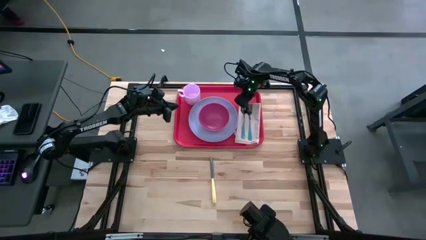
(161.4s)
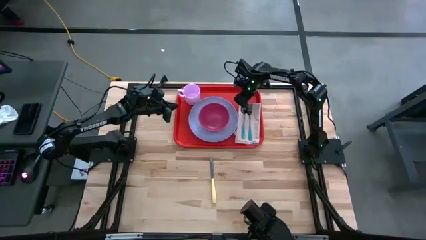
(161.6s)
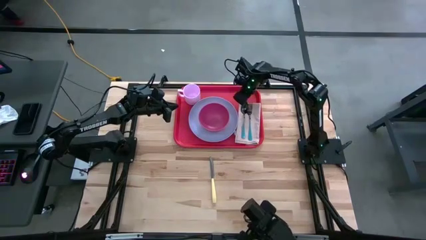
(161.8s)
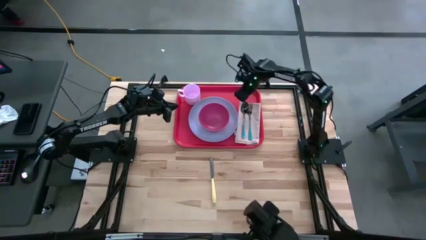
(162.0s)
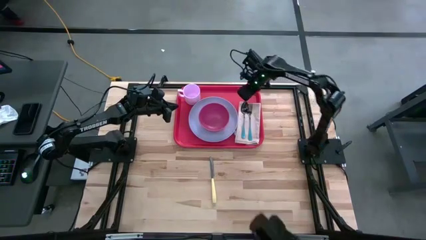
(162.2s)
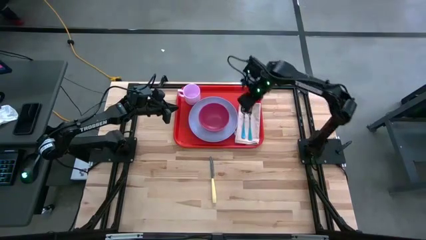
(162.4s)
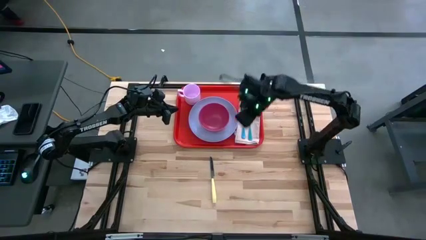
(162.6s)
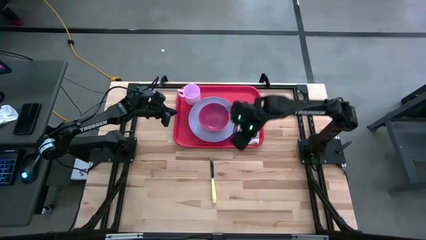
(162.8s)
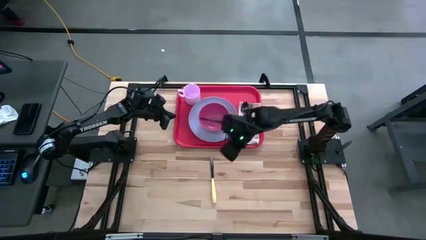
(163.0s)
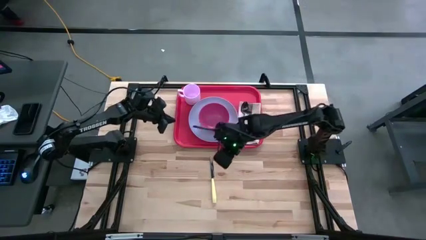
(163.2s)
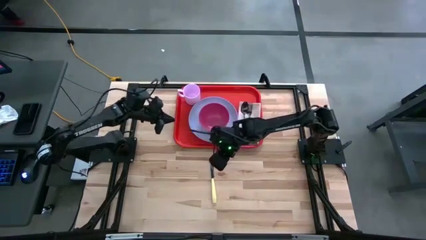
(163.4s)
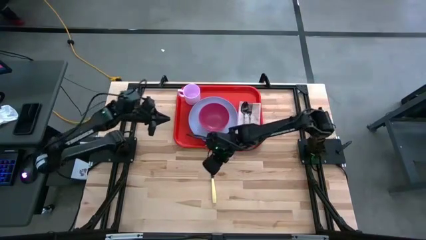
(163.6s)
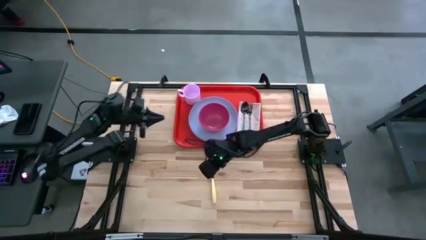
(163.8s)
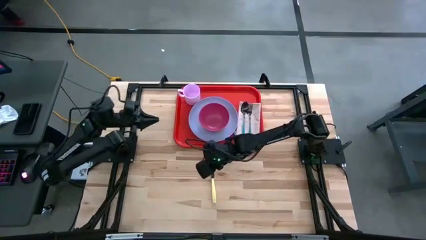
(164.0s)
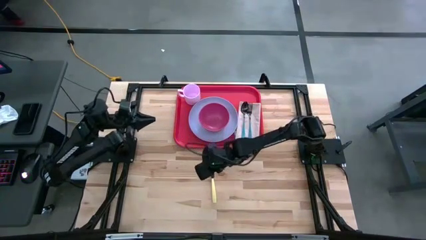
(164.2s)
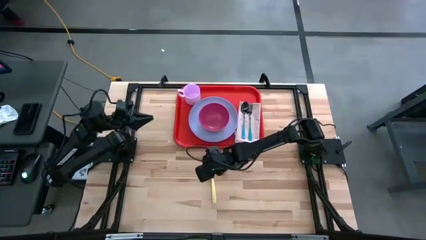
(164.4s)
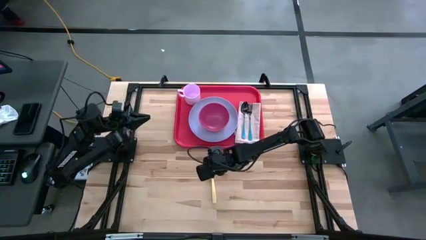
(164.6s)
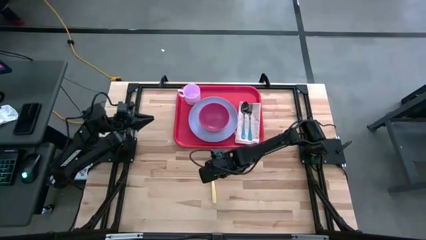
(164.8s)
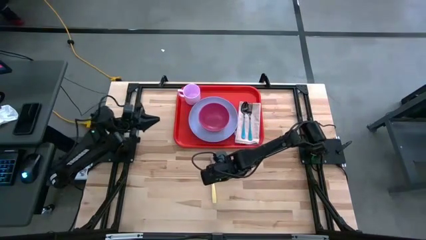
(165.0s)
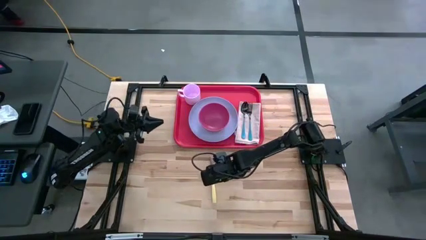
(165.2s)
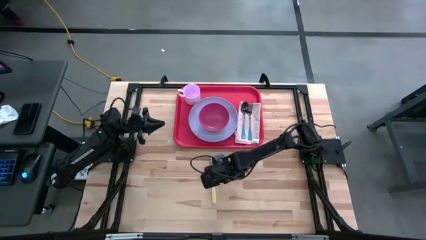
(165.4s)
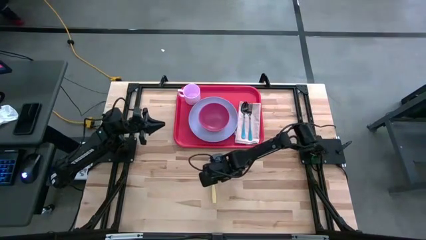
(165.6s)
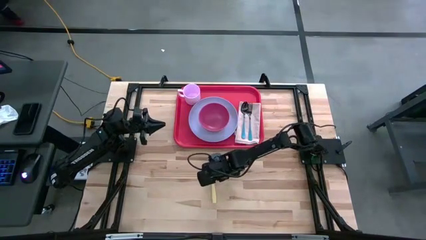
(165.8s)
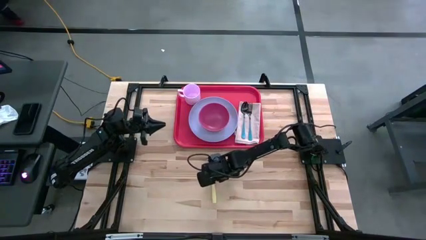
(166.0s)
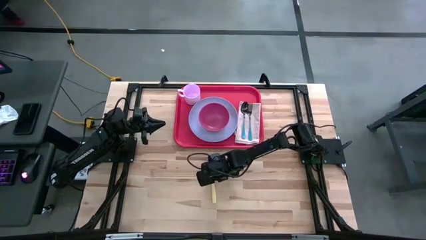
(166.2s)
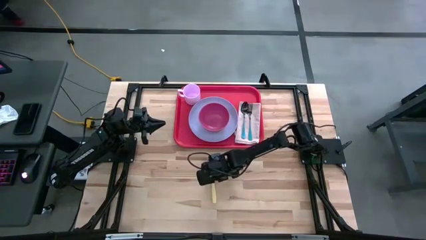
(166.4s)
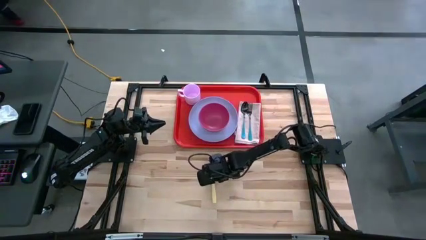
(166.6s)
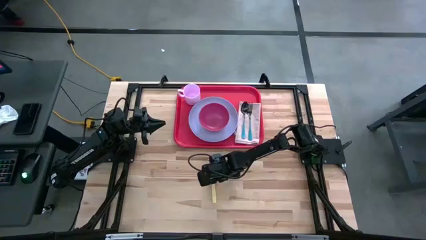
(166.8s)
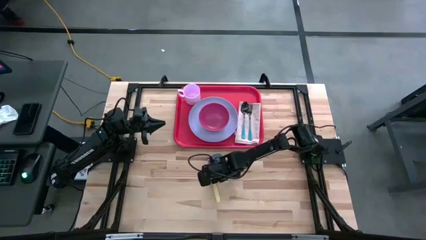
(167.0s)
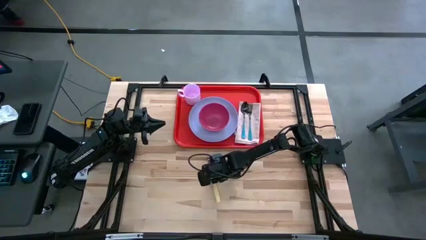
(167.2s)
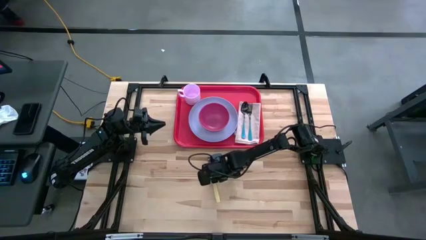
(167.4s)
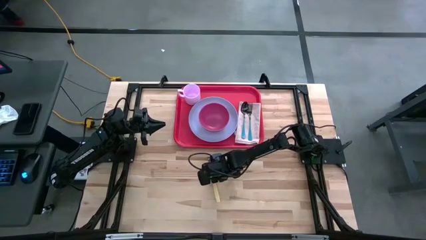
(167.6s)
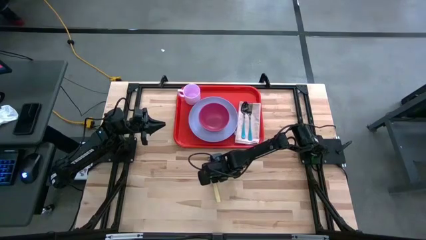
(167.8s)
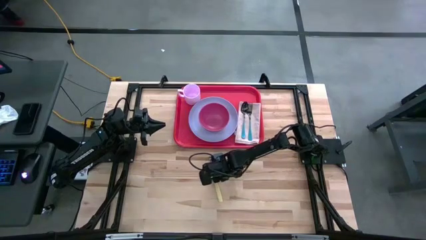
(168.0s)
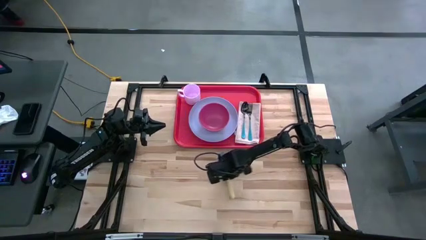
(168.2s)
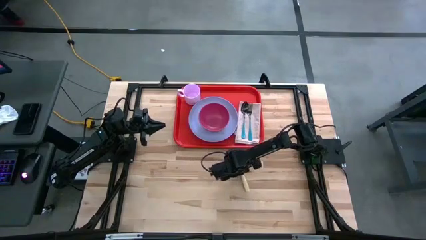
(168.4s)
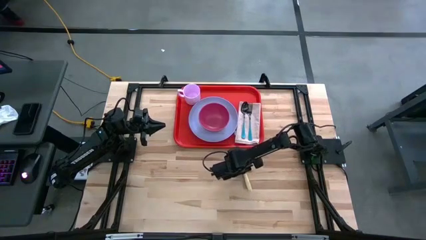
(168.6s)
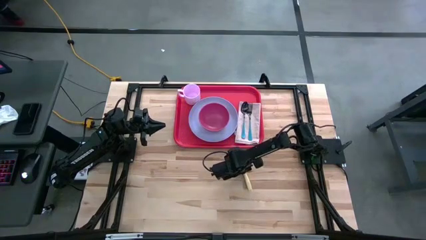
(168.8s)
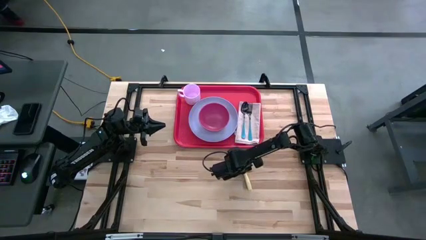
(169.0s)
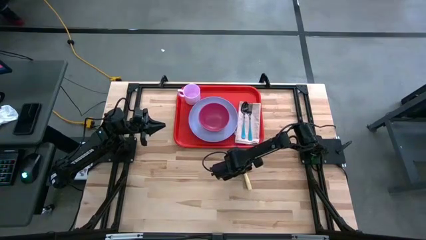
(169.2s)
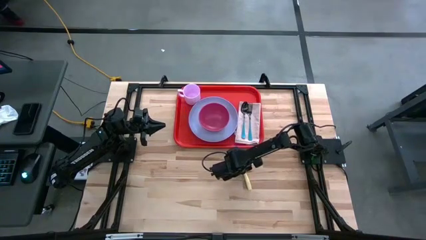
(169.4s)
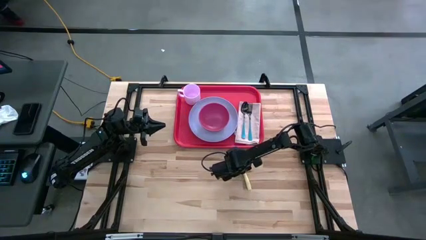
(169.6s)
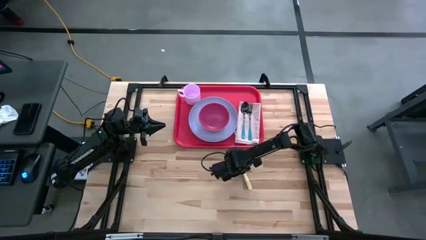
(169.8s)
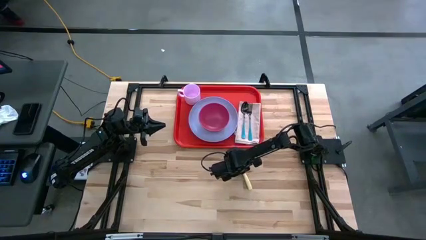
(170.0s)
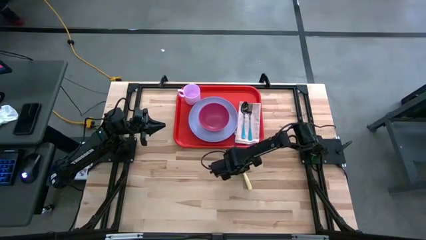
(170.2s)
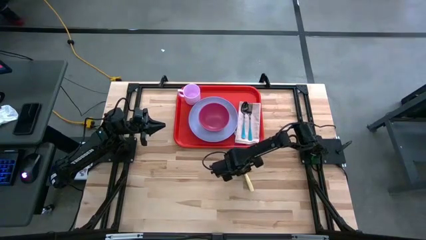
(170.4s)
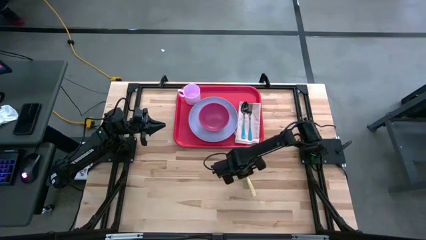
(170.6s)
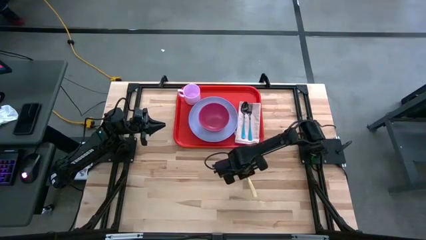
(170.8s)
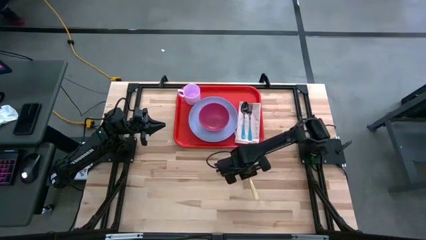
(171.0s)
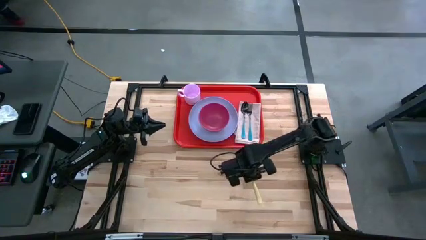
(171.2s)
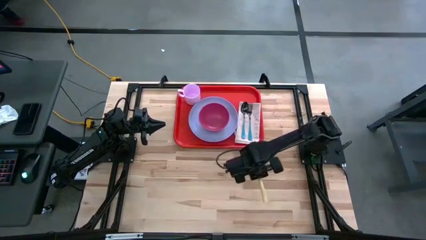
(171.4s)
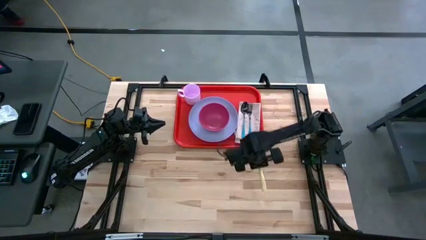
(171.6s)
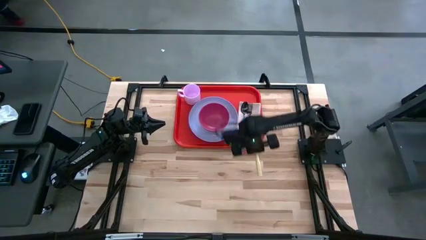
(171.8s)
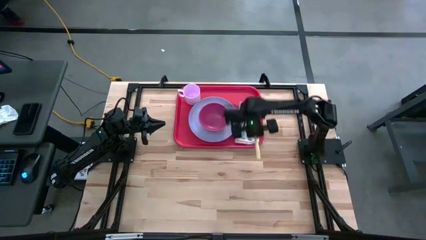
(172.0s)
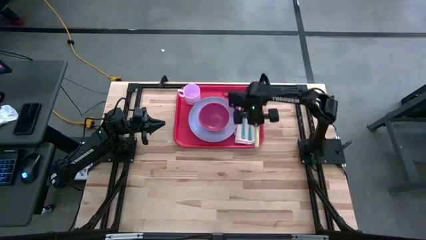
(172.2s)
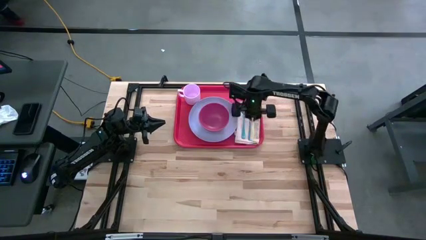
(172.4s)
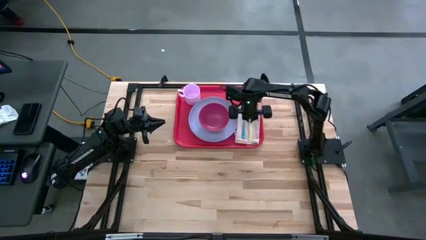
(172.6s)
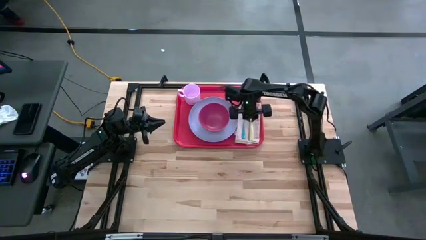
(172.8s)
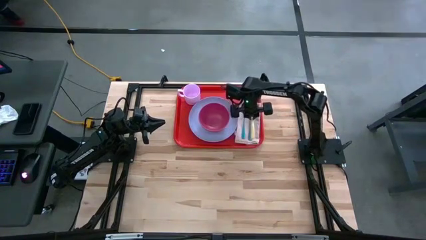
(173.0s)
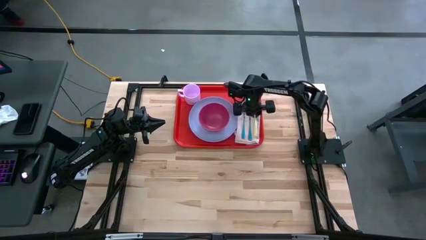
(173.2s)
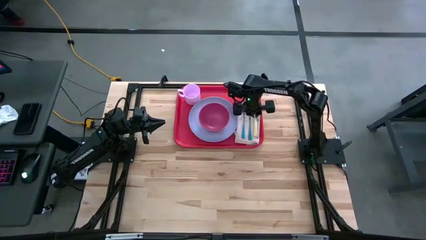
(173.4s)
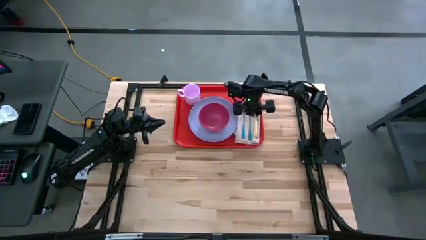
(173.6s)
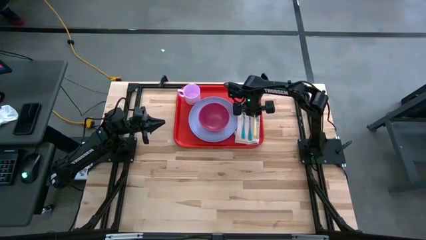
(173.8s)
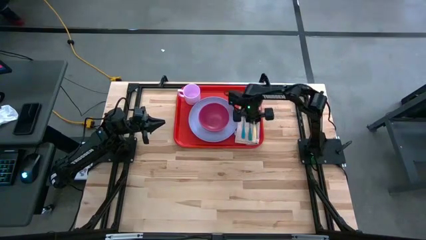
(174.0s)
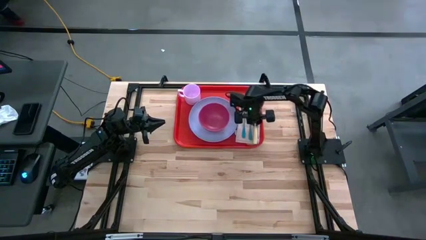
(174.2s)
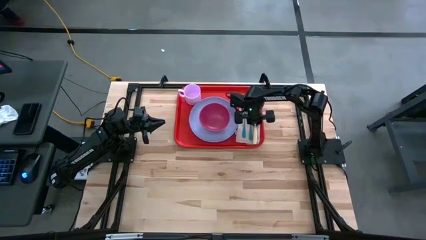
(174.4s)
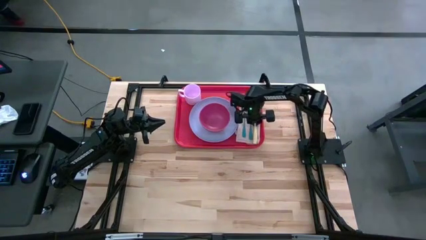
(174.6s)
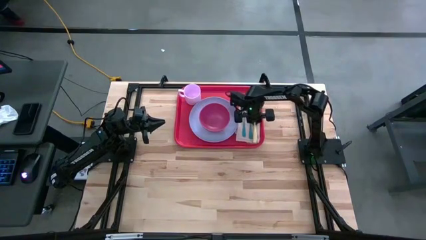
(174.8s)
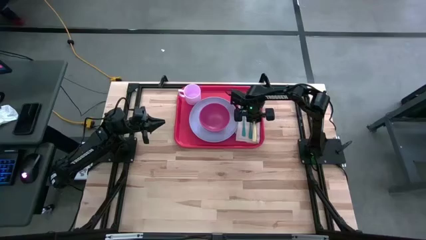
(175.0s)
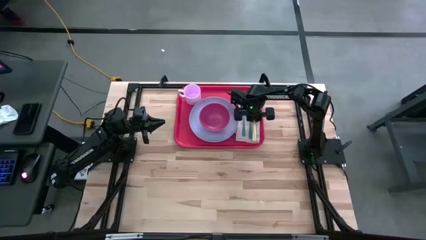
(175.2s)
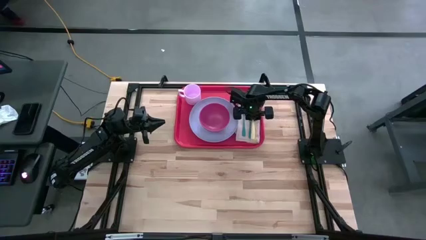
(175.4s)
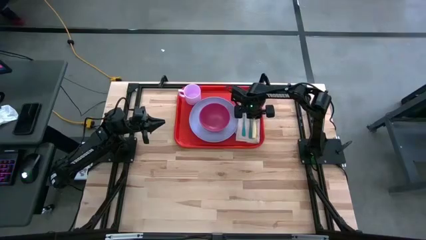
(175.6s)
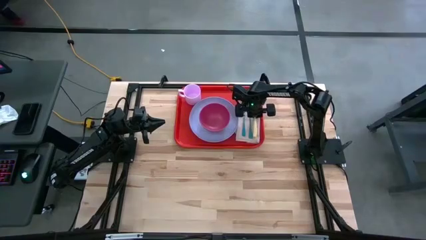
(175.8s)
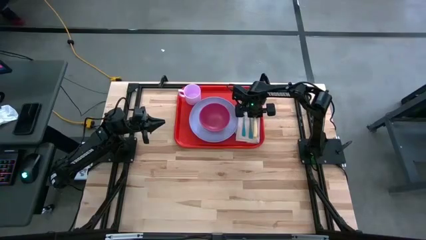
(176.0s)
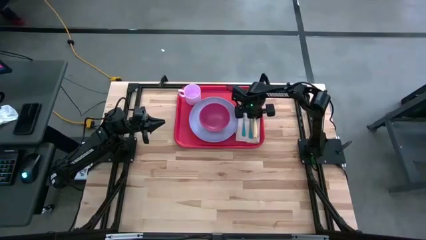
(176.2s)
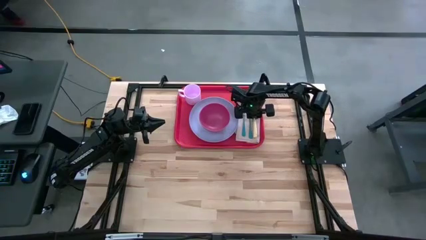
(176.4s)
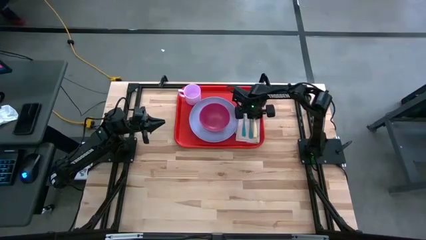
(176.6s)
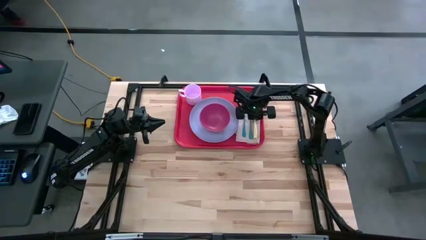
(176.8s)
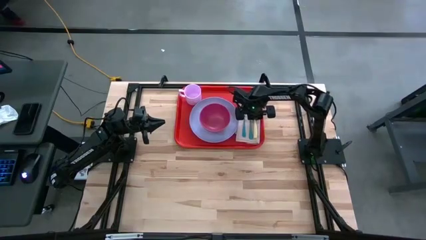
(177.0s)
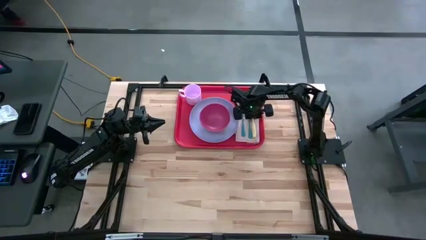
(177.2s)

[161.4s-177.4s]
Task: Set up tray
Put the yellow table knife on the white napkin to right of the blue fork
